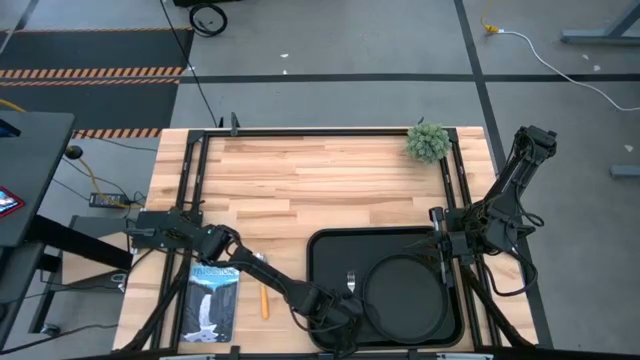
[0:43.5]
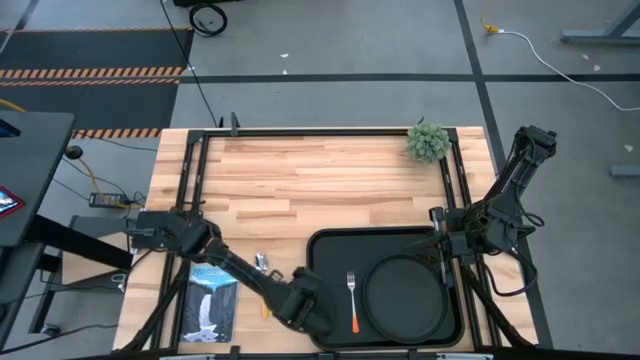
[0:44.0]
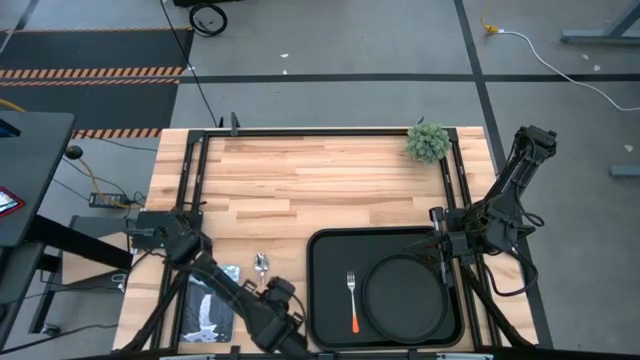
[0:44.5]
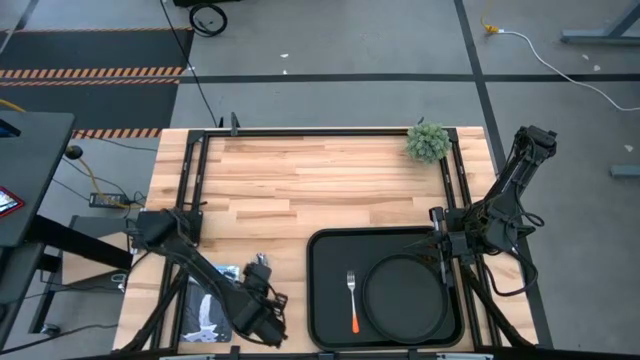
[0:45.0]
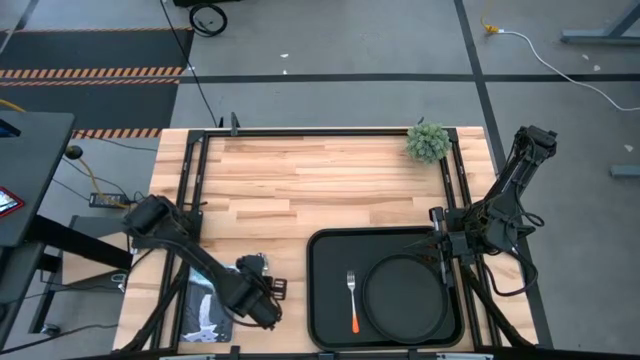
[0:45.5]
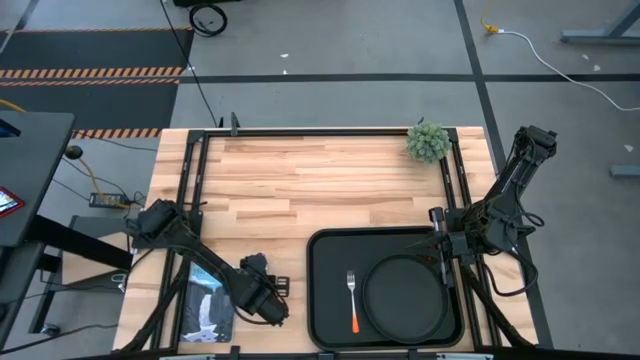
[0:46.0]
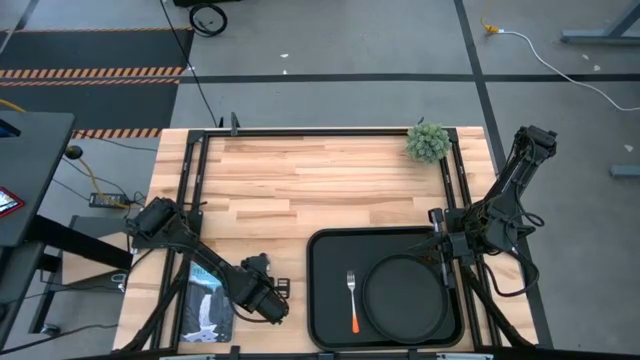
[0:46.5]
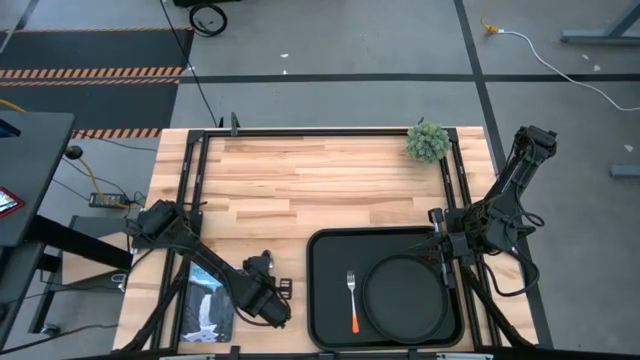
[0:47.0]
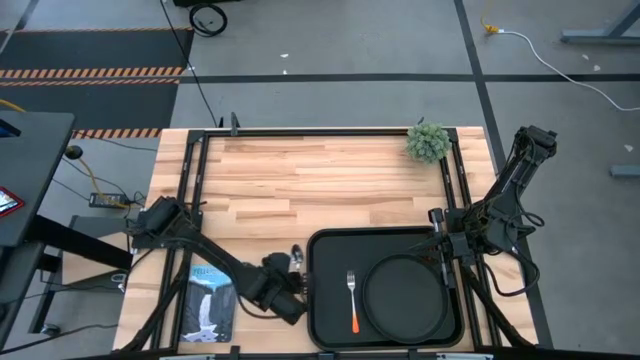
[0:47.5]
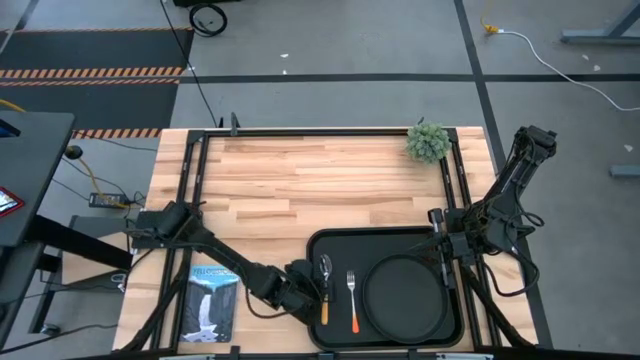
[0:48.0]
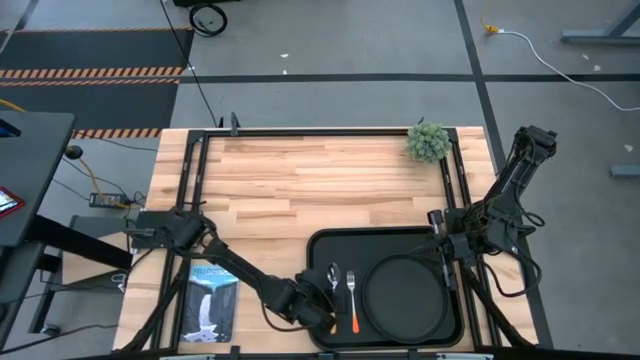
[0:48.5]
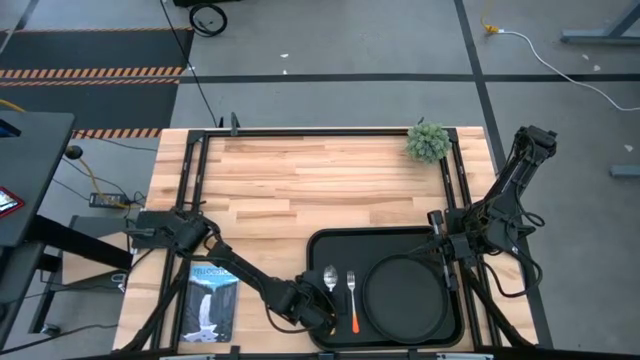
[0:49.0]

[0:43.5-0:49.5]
Task: Pick and place plate/cup/fork/spoon on tray
Put the yellow spoon on the black tray to the left of the orange fork

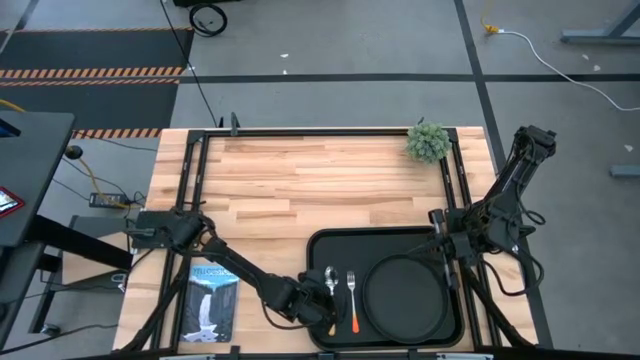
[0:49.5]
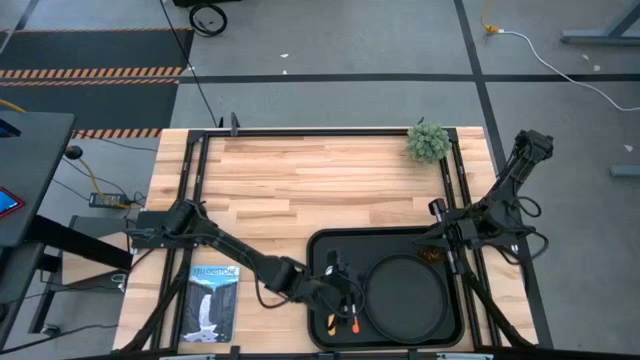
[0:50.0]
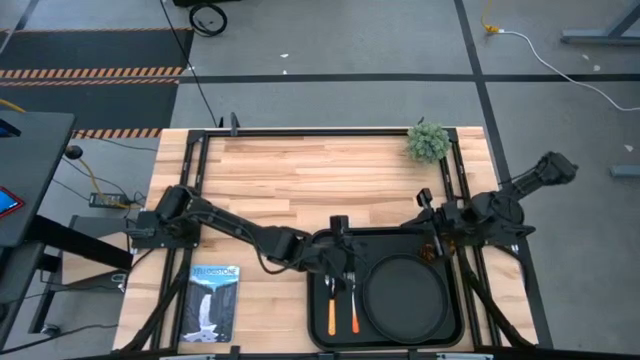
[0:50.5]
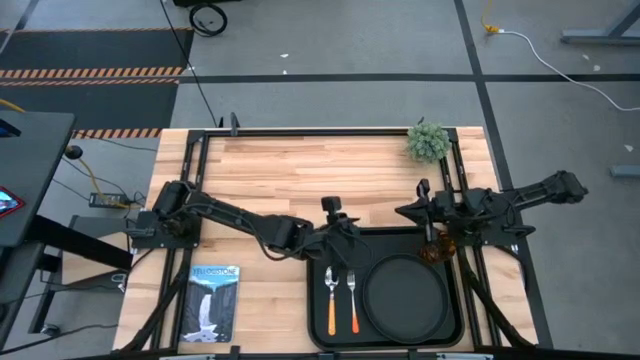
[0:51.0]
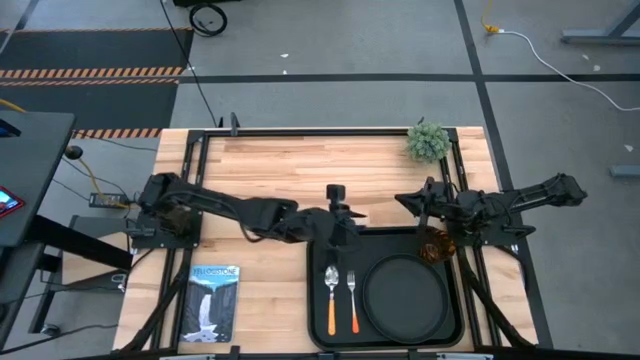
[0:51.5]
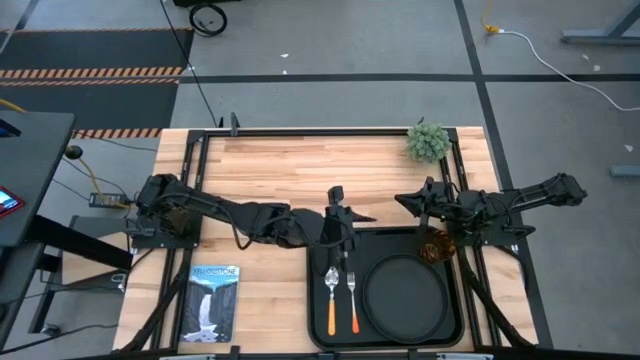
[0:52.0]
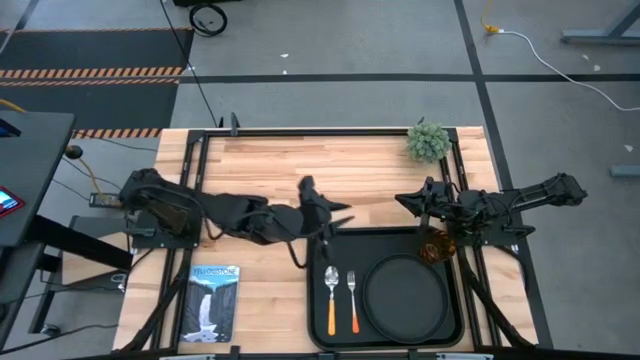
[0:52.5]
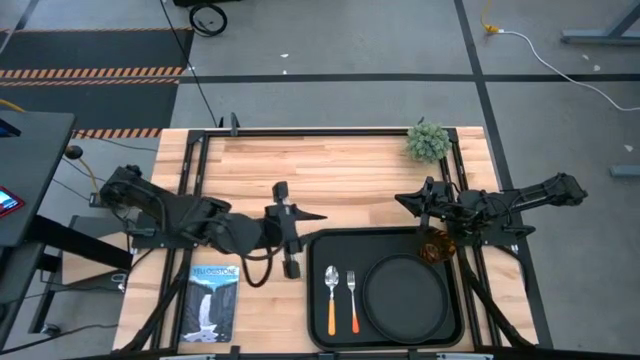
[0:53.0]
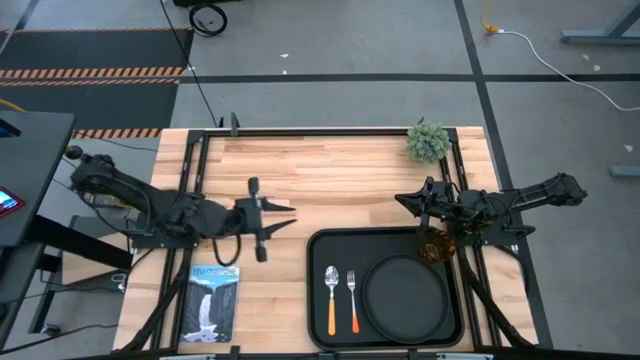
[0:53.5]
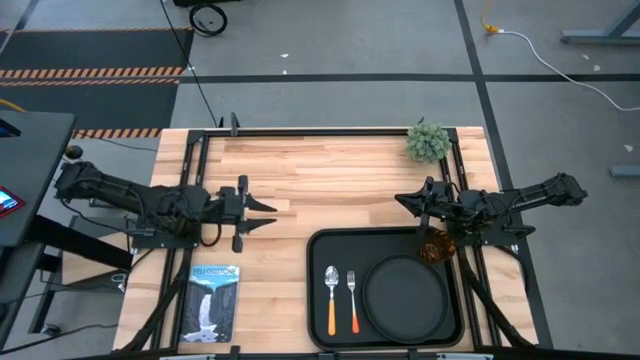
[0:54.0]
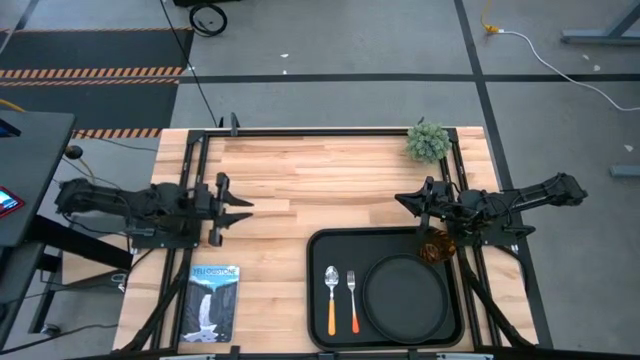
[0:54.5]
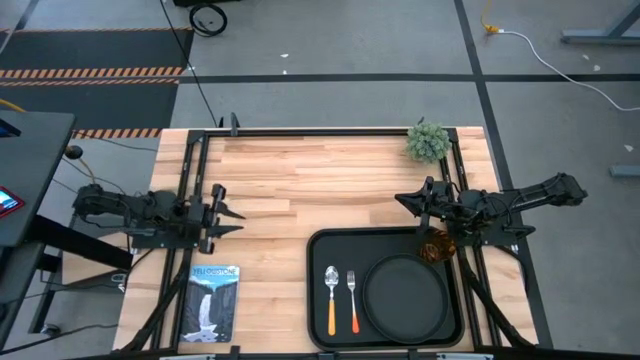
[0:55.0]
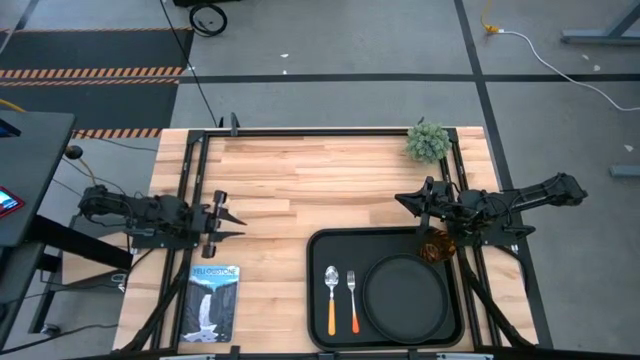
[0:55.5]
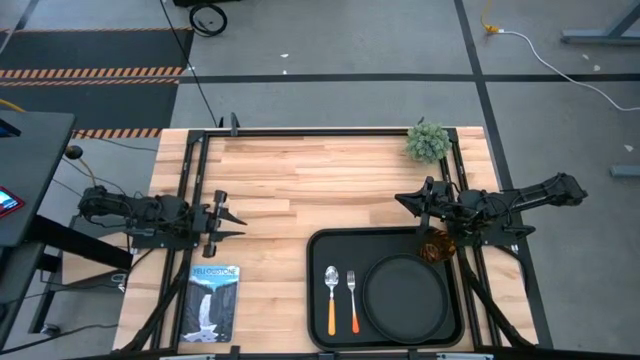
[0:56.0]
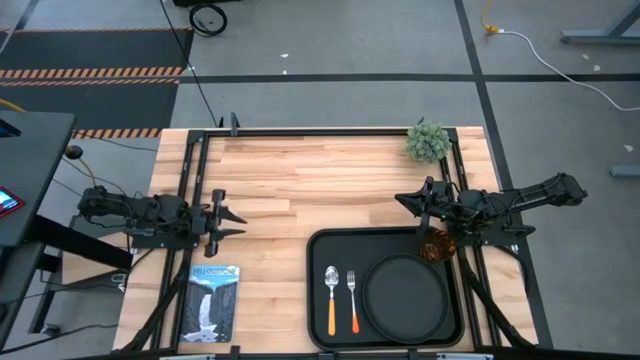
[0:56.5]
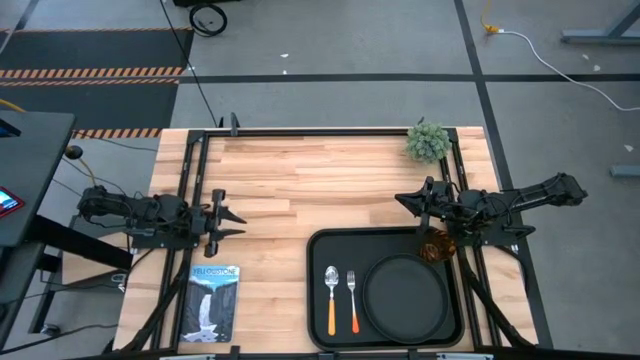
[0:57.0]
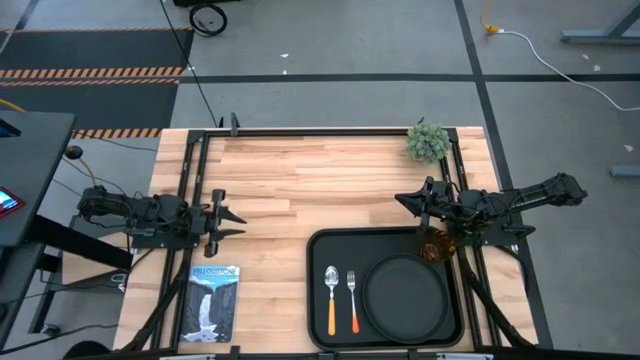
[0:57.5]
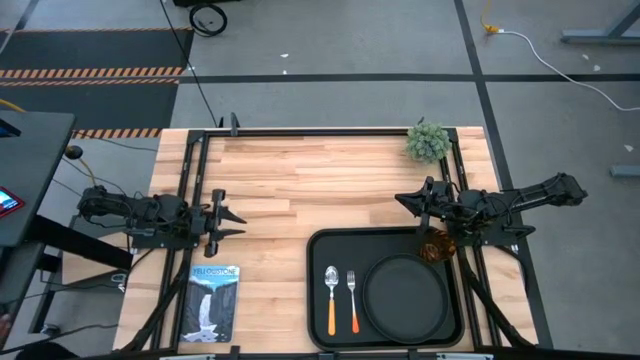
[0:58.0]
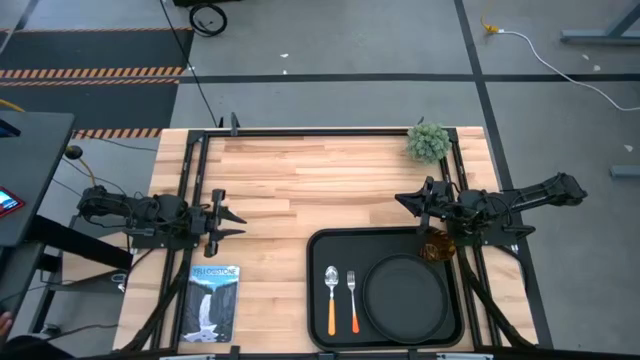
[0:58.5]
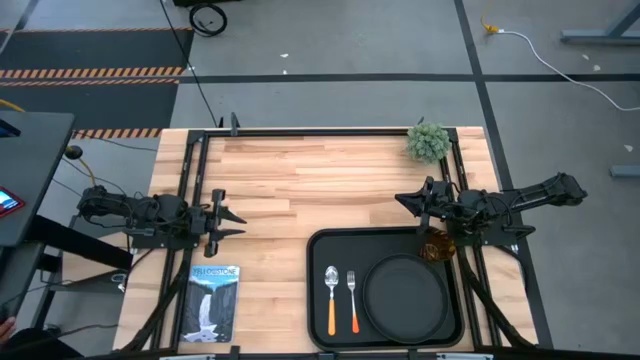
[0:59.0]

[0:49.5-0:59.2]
Return to Home Position

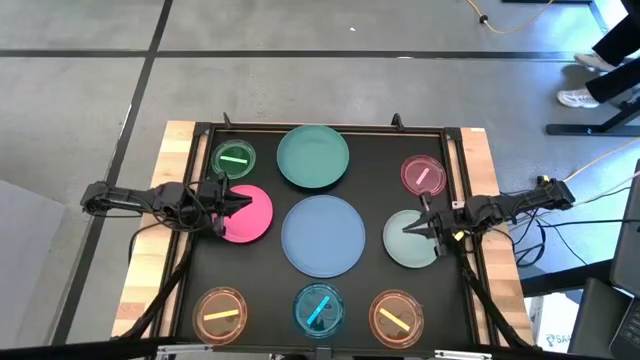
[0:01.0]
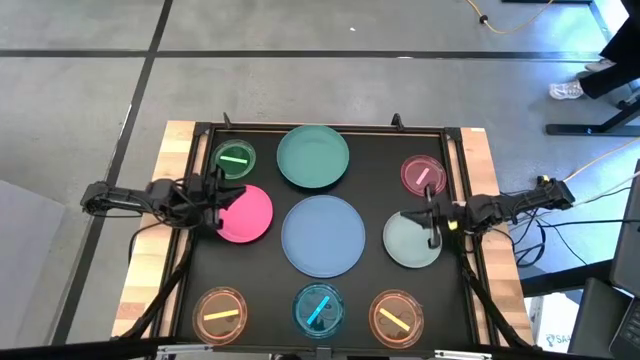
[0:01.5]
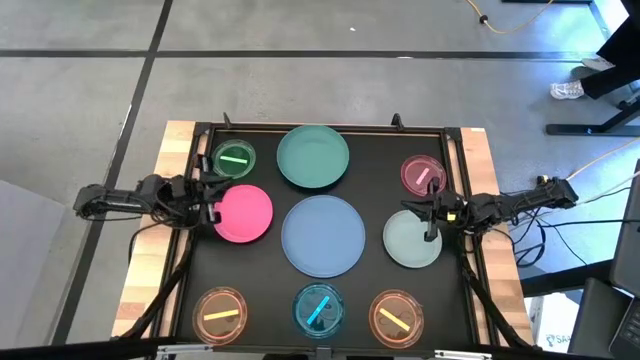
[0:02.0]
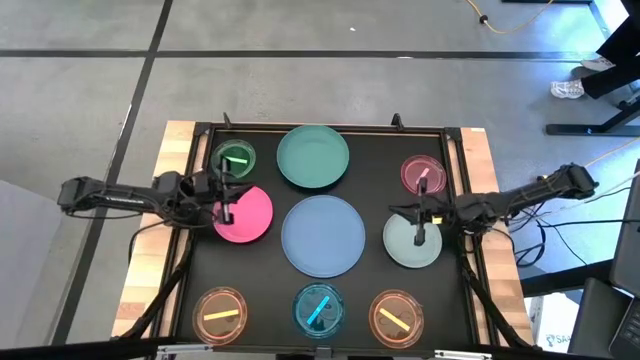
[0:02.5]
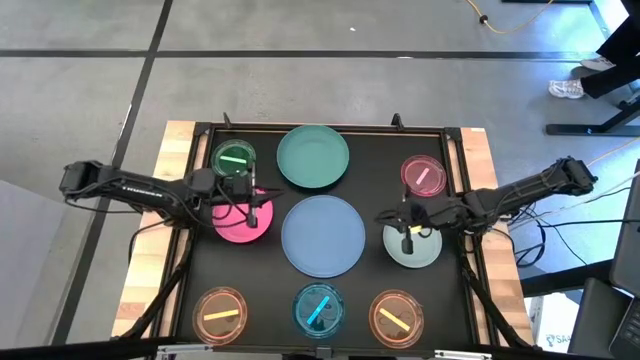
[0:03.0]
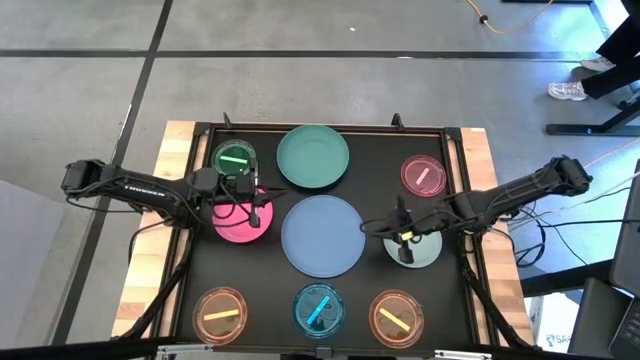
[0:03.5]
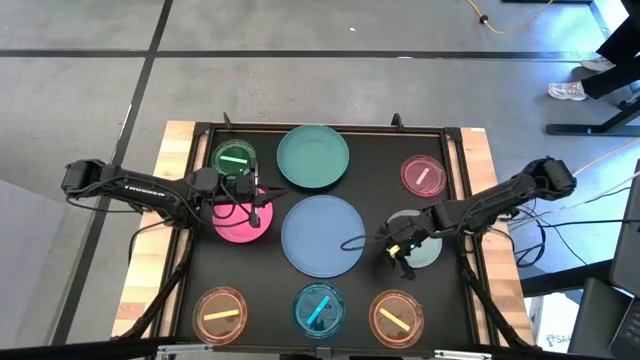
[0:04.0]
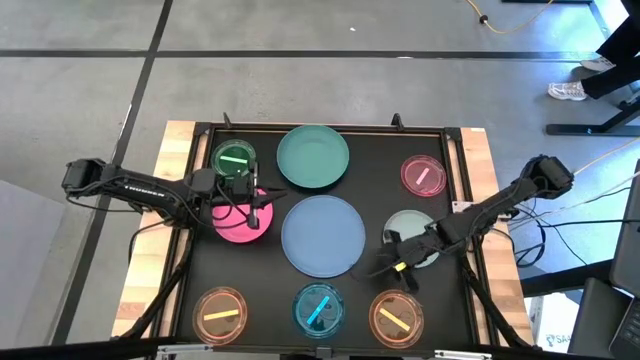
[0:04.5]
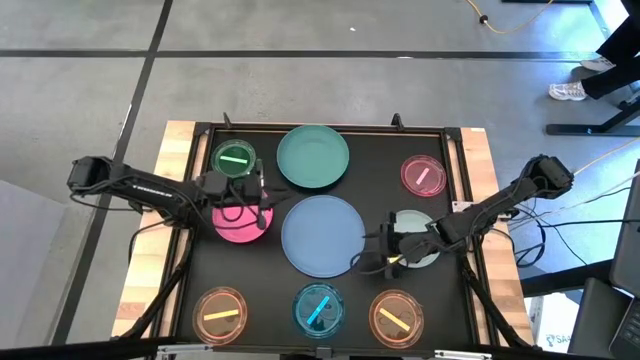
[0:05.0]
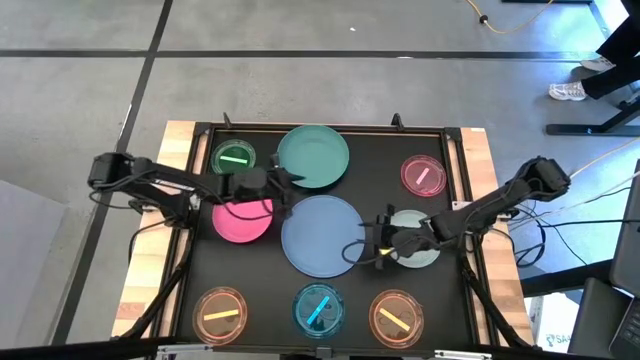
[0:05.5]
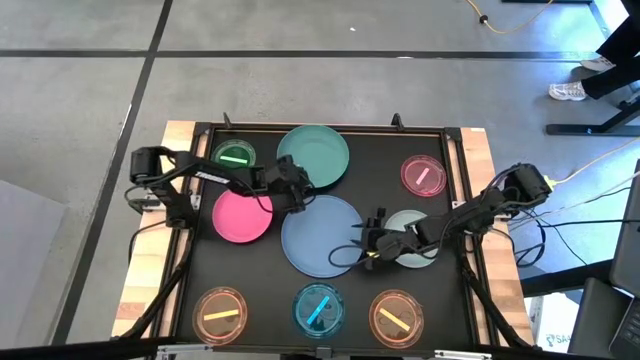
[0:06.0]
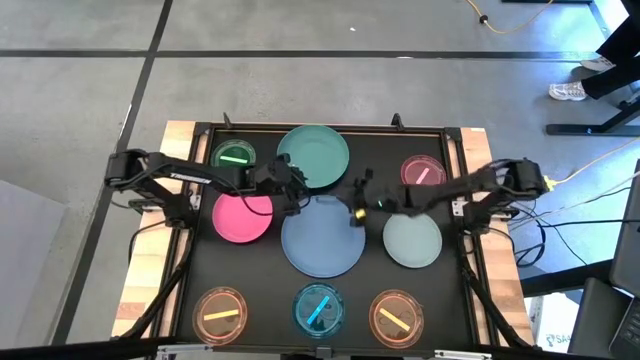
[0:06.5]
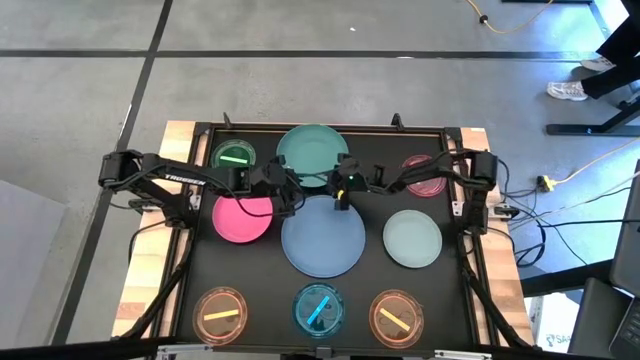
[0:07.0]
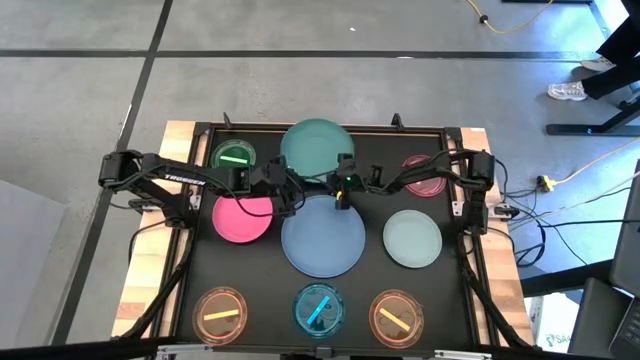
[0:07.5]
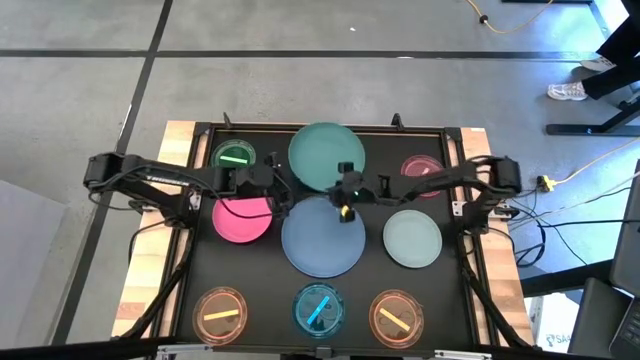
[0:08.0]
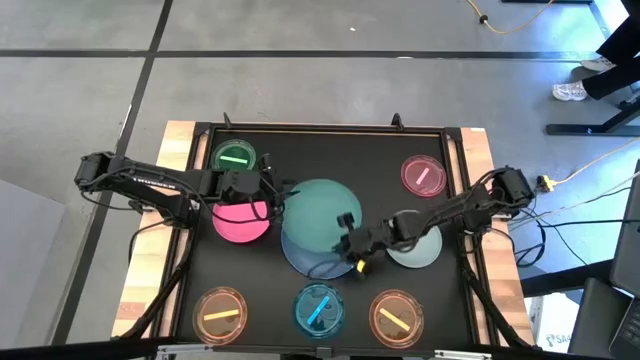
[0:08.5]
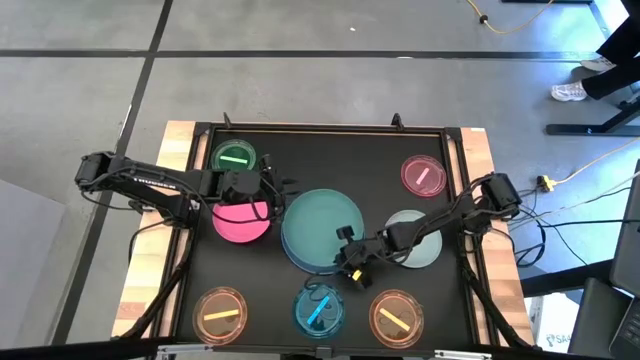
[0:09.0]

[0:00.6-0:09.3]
Task: Stack plastic plates
Stack the green plate on top of the blue plate
